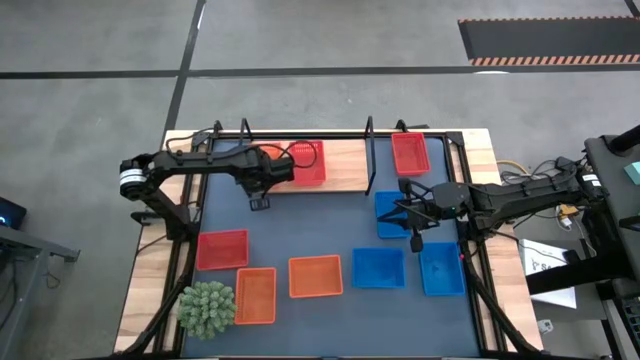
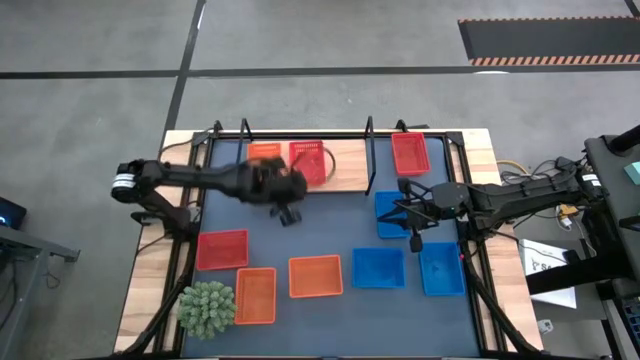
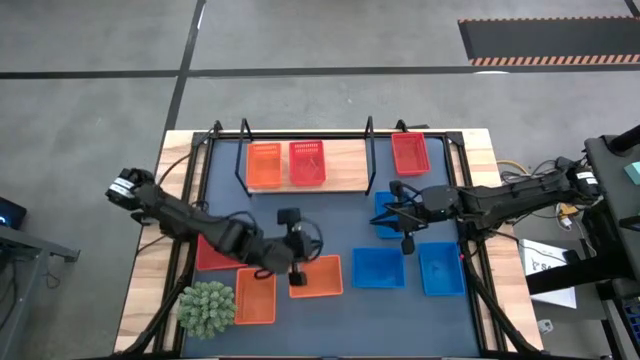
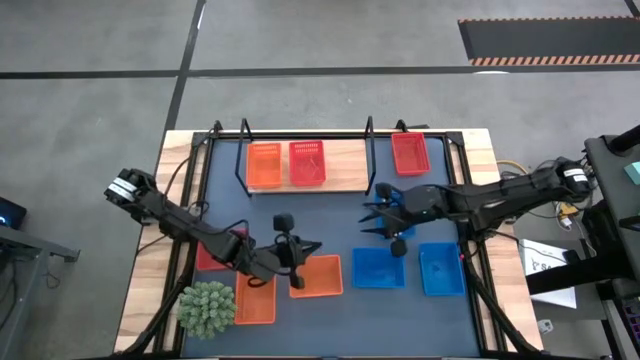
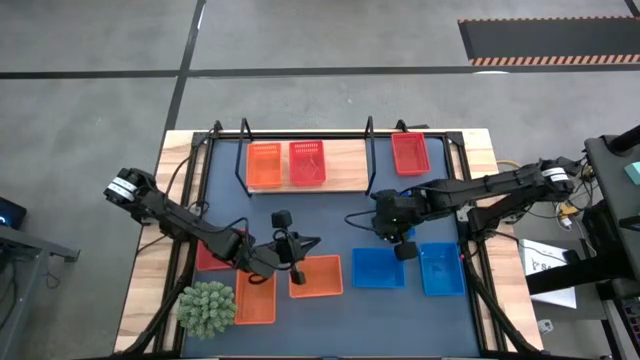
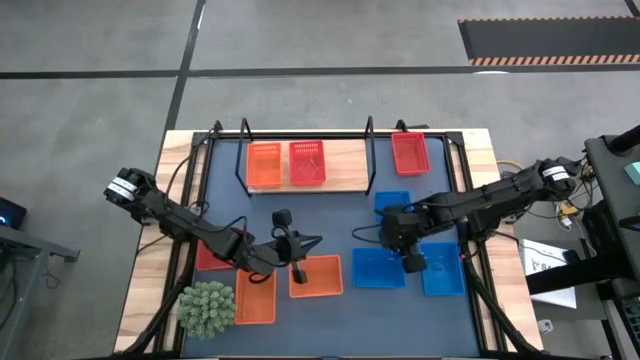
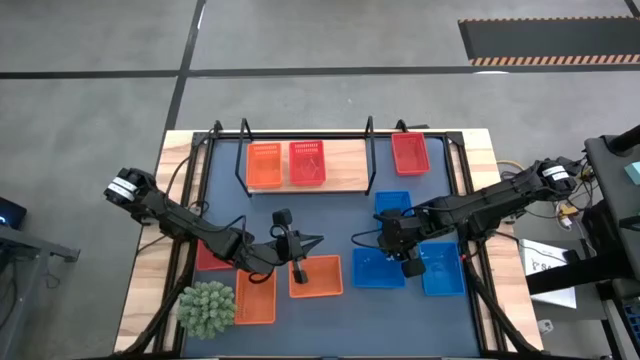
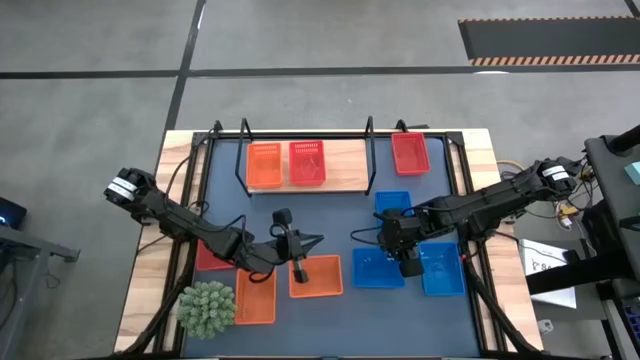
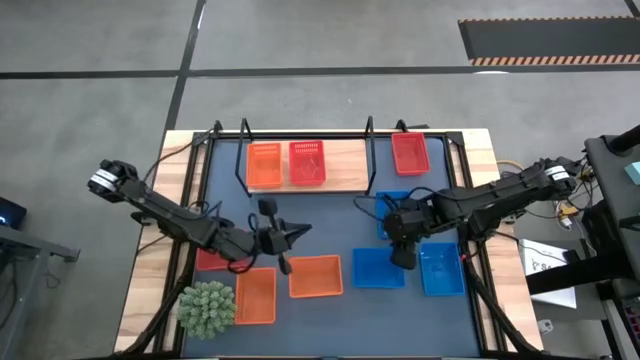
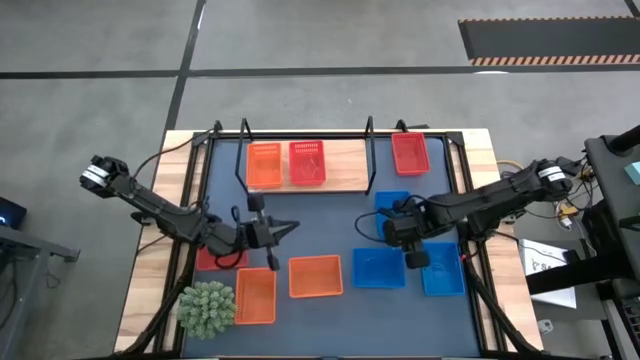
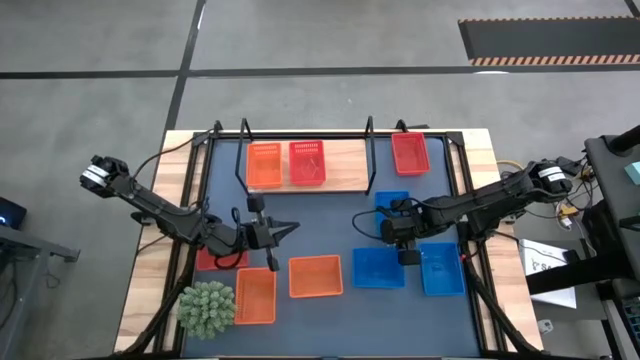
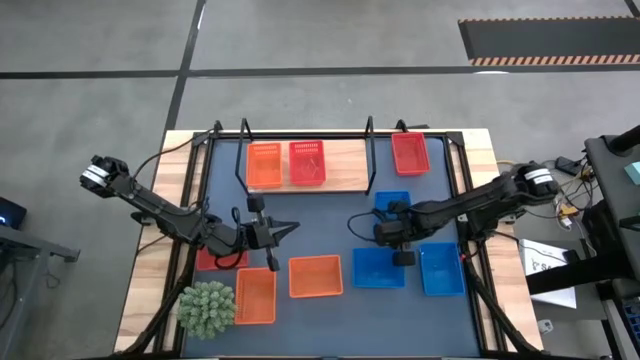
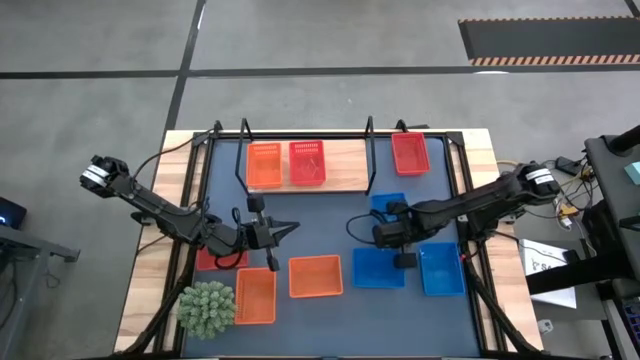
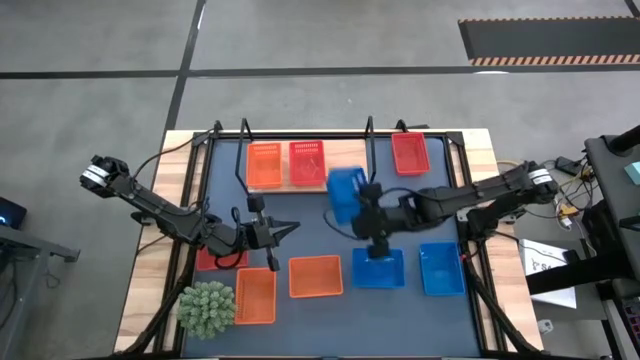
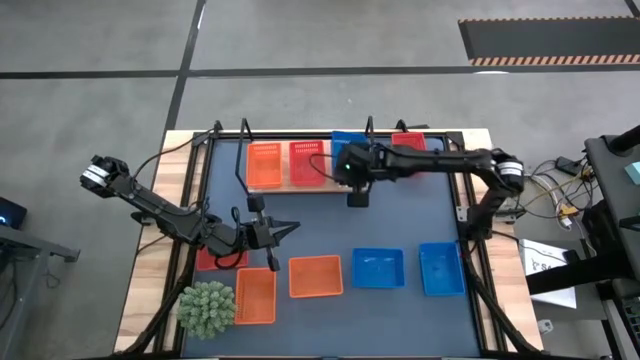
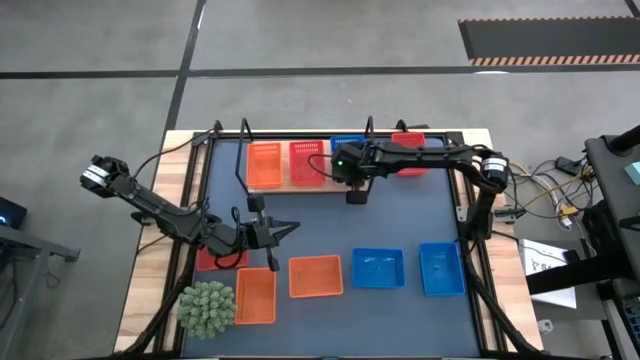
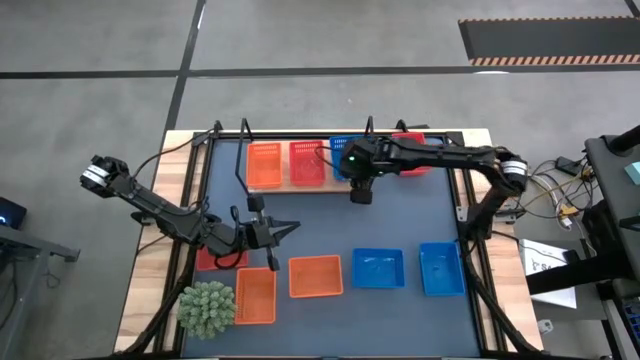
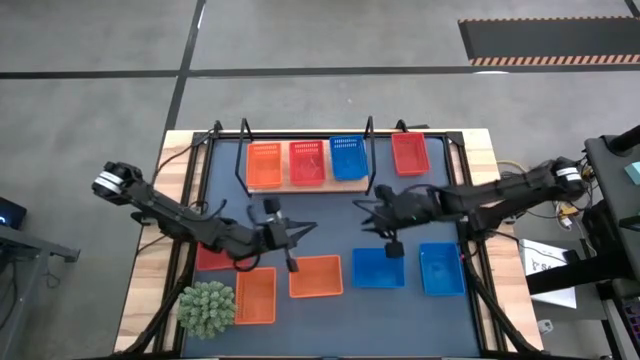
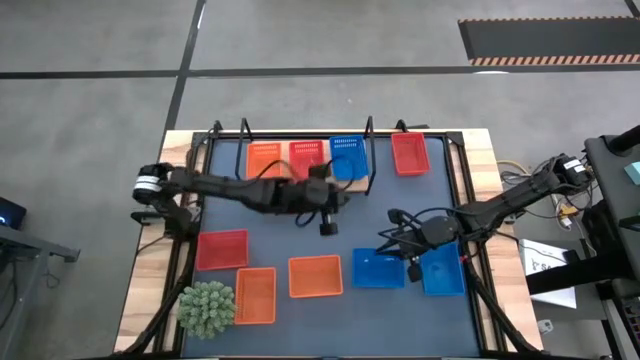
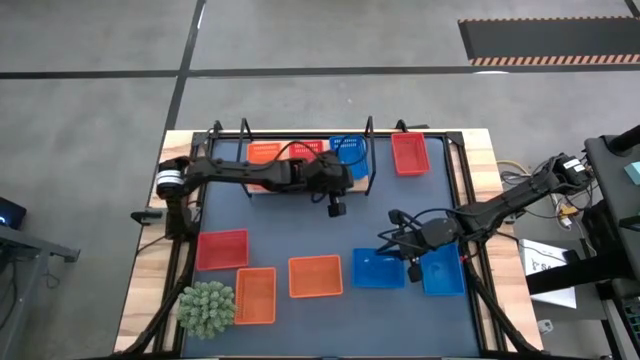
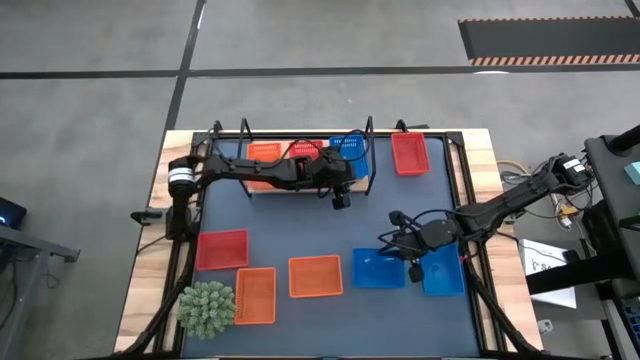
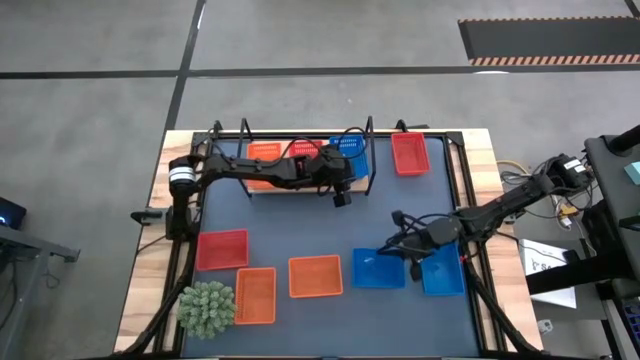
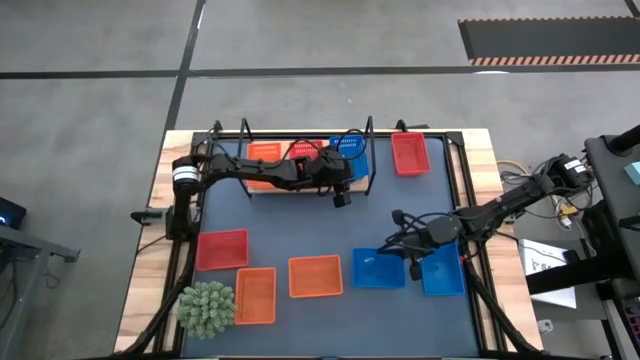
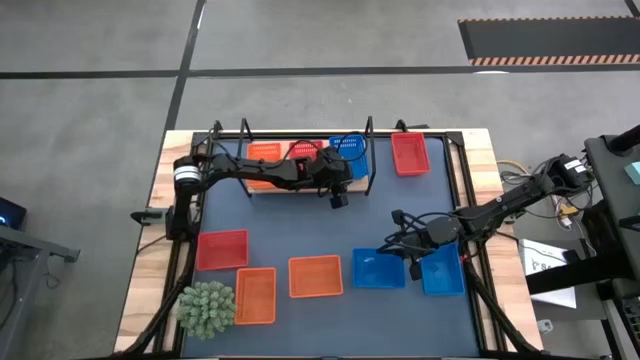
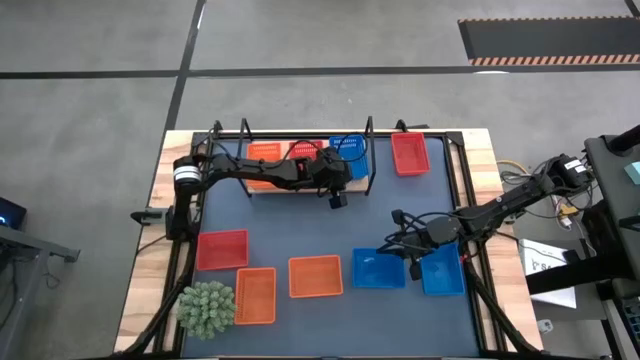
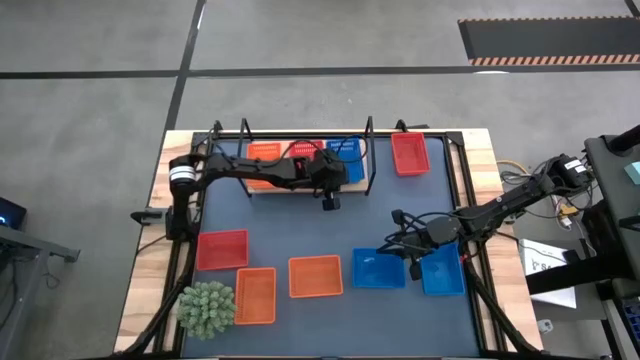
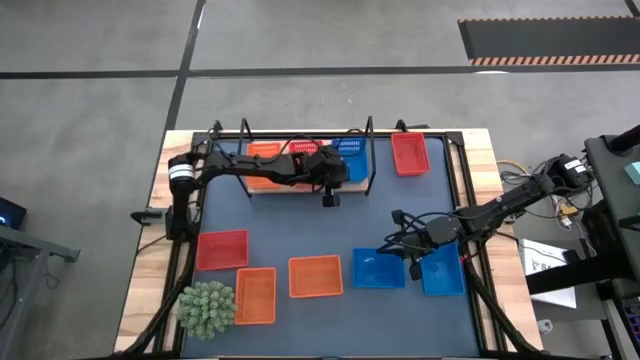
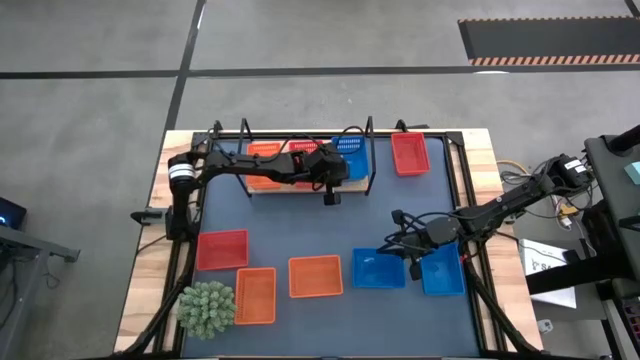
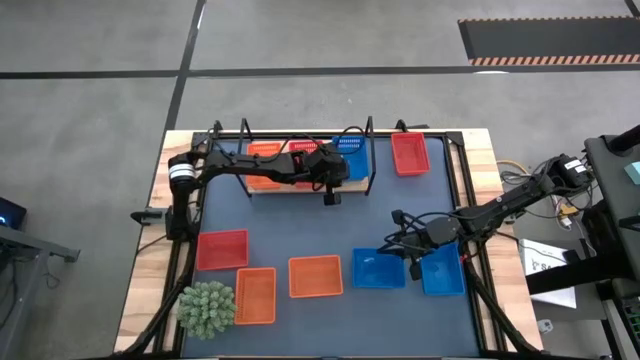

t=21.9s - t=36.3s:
Task: Stack baskets on shelf by color
Put the top blue basket on the shelf

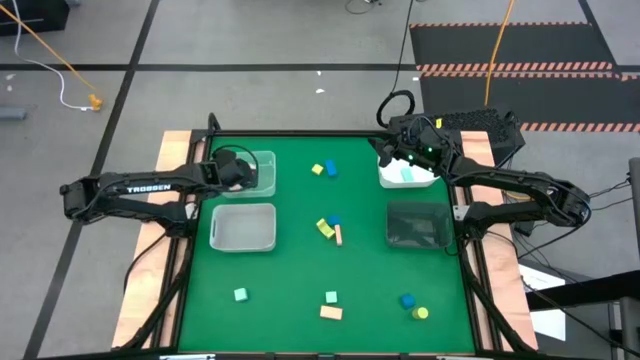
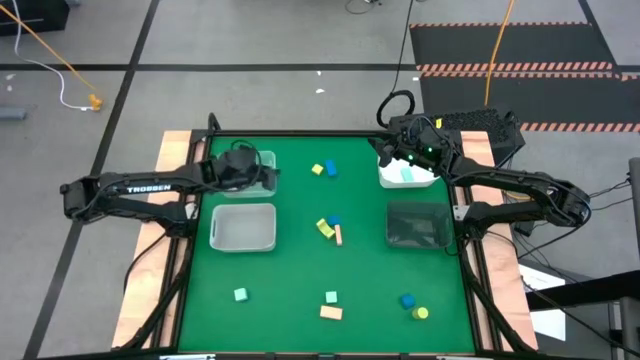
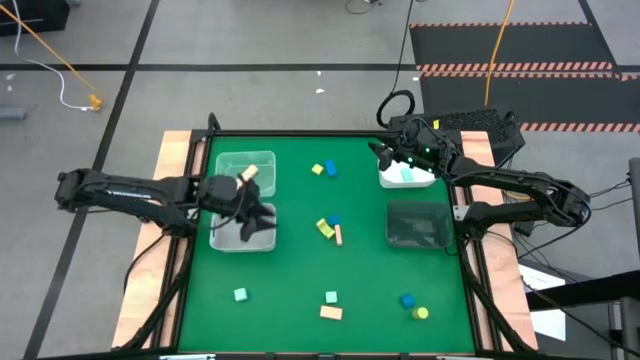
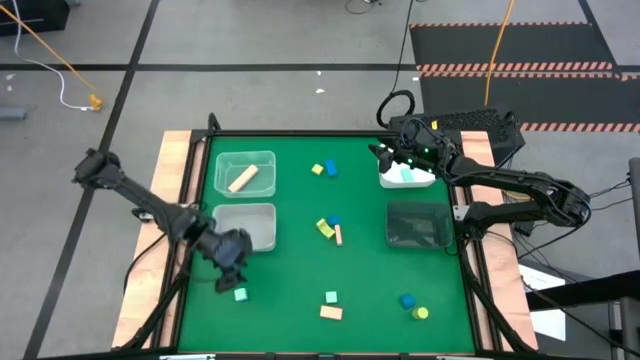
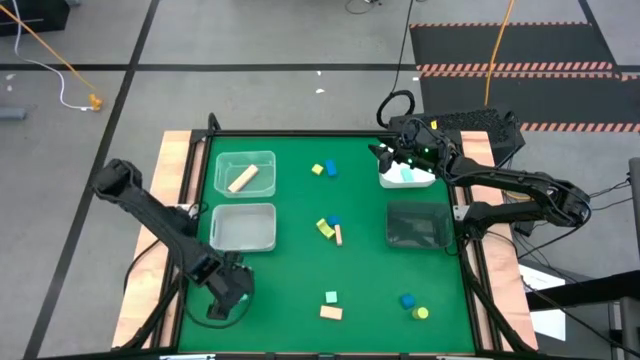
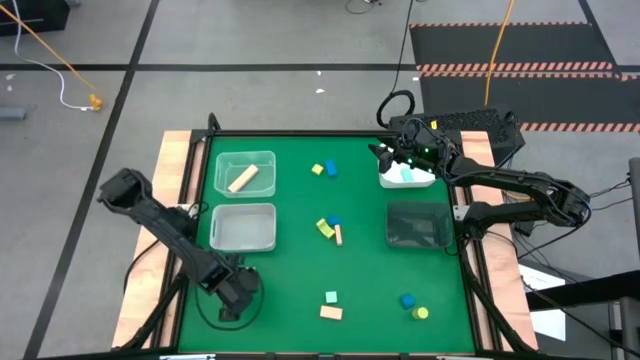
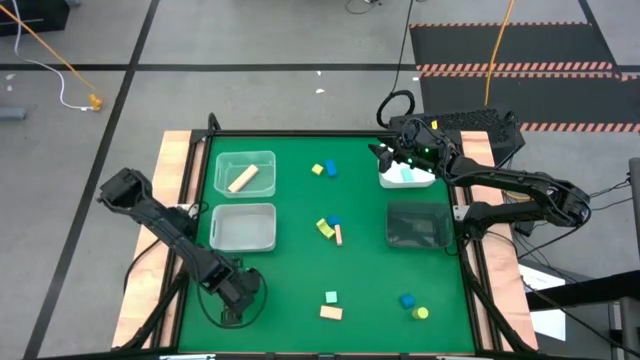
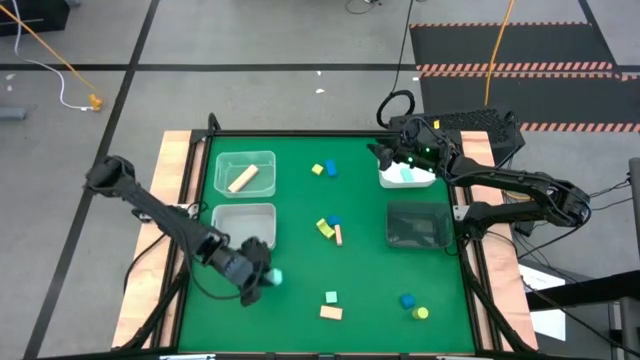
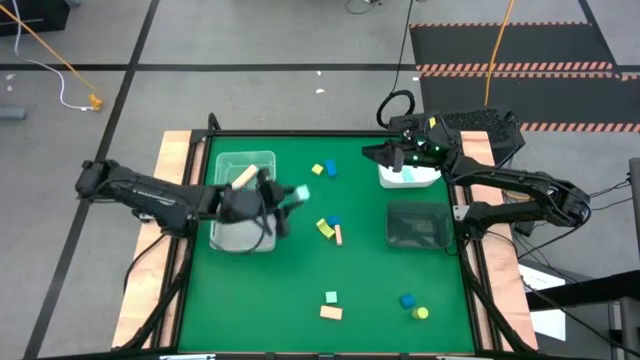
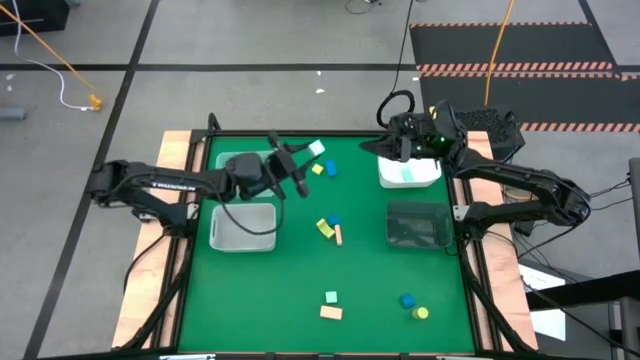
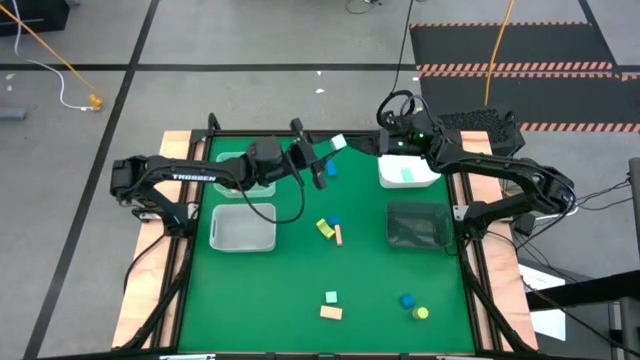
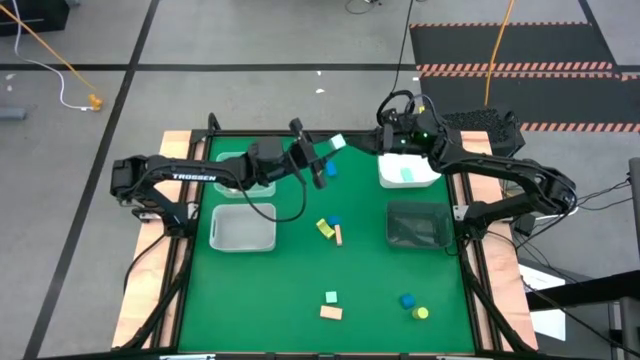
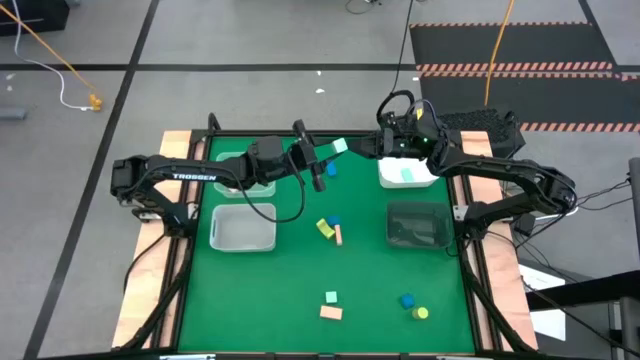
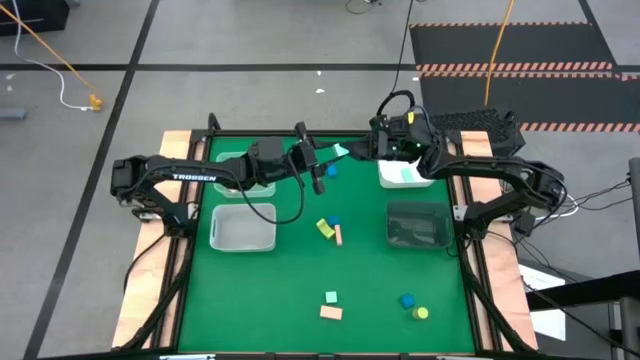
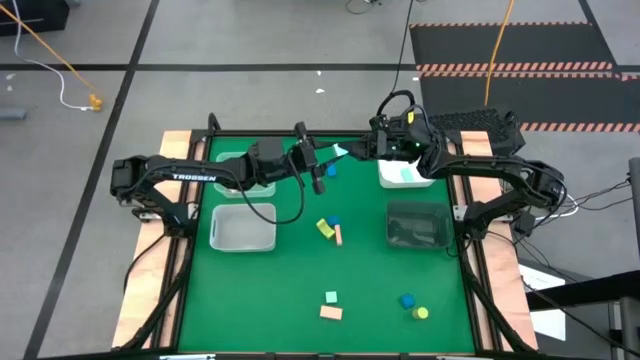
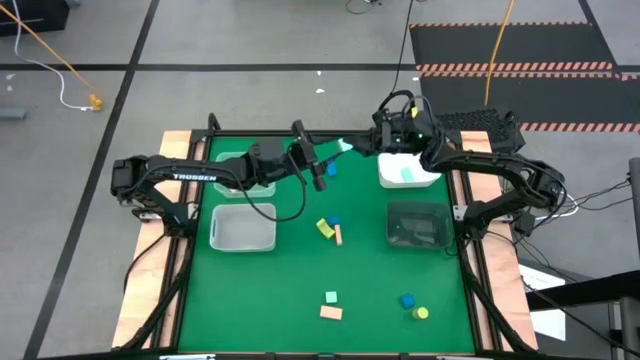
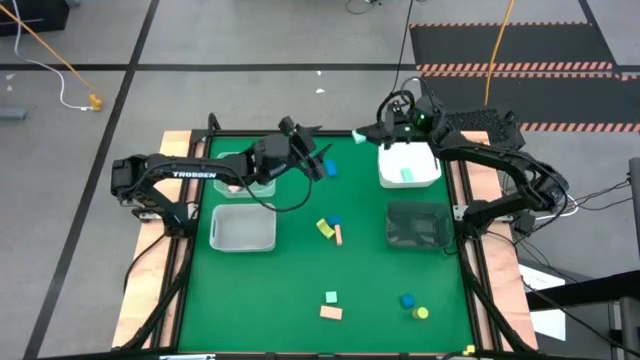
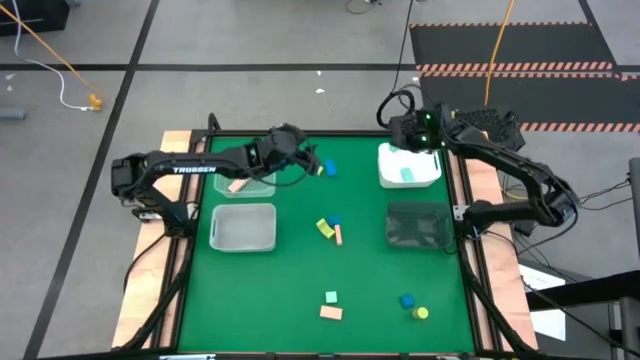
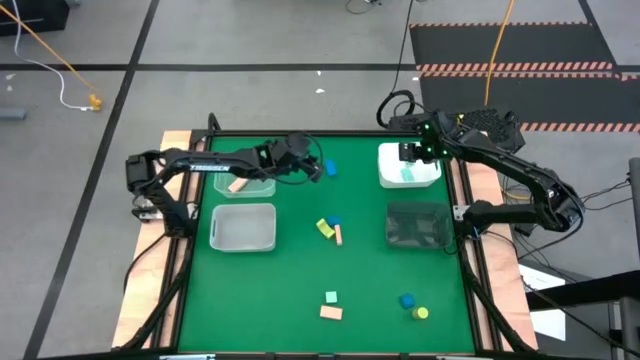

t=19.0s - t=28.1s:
Task: Sort & place blocks by color
Put the left light blue block into the white bin
